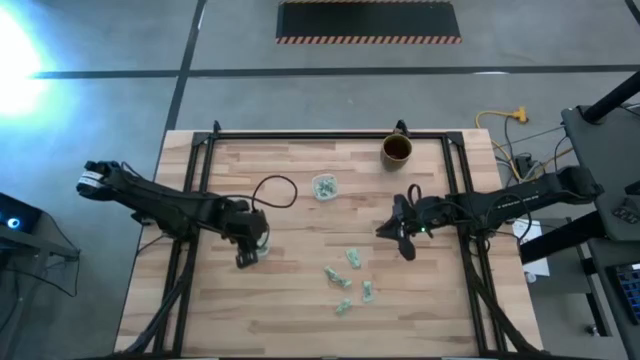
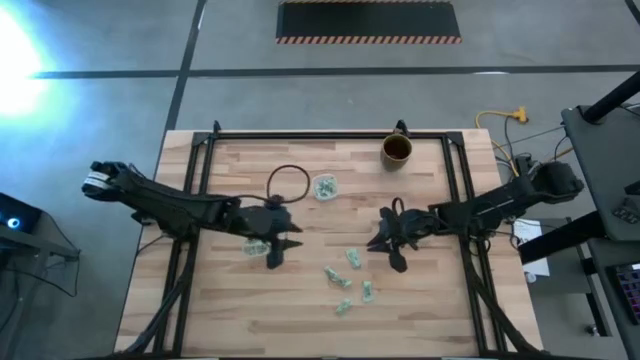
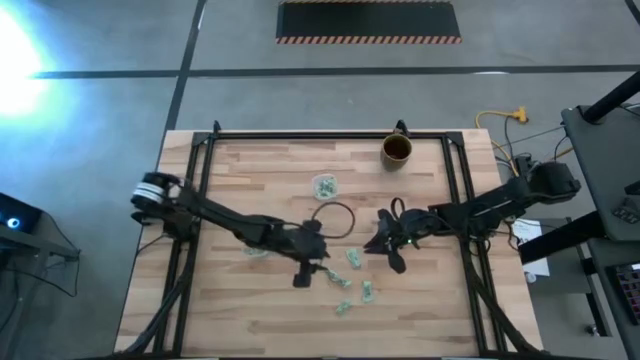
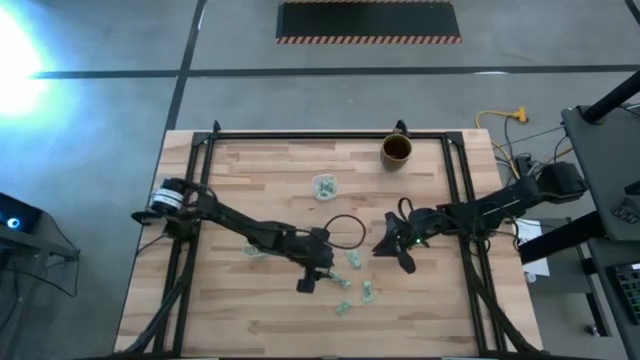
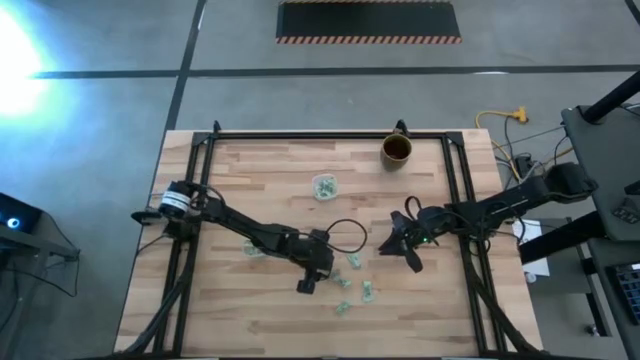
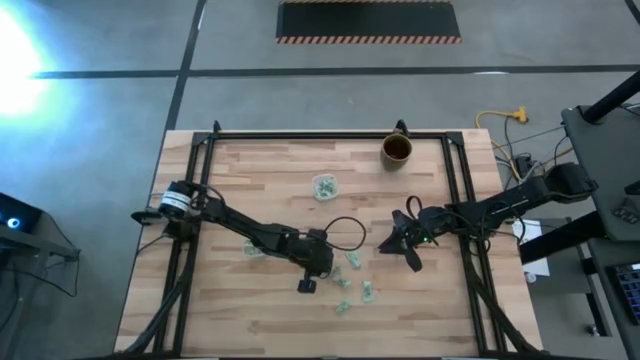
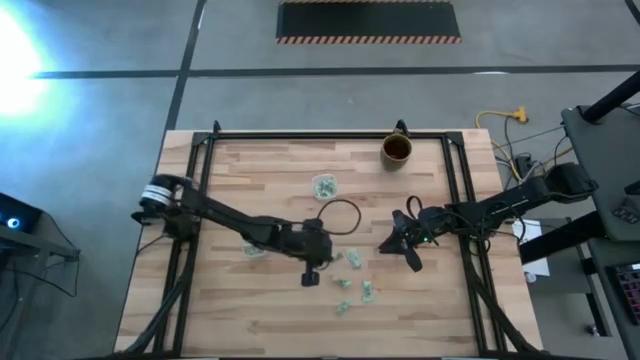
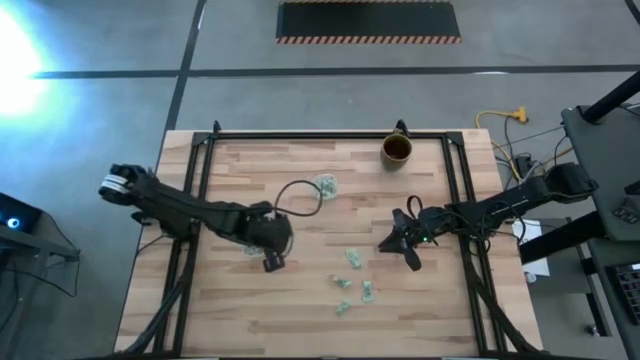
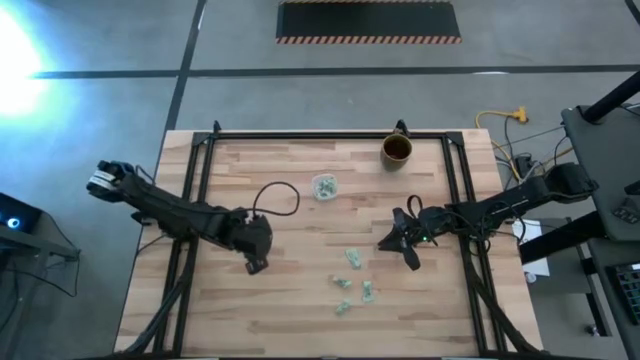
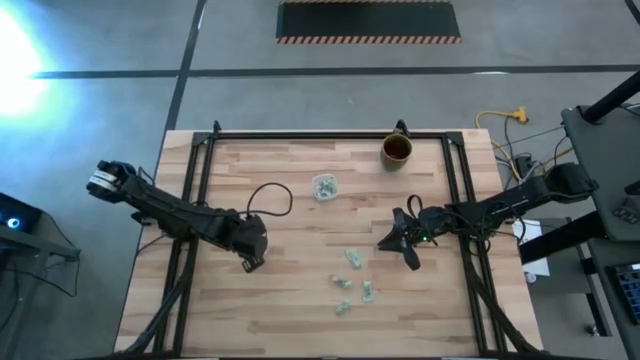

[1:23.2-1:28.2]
Task: Pick and place Stevia / Truvia into bins
Put the stevia packet into the bottom transparent container

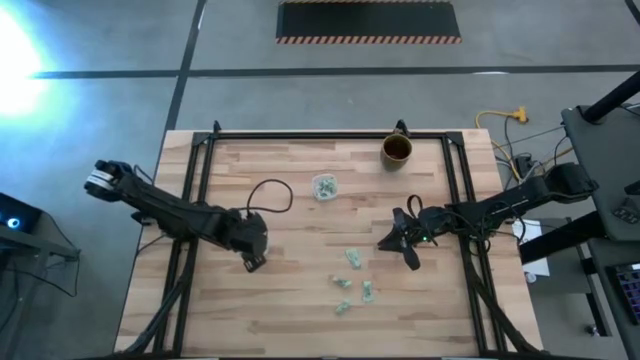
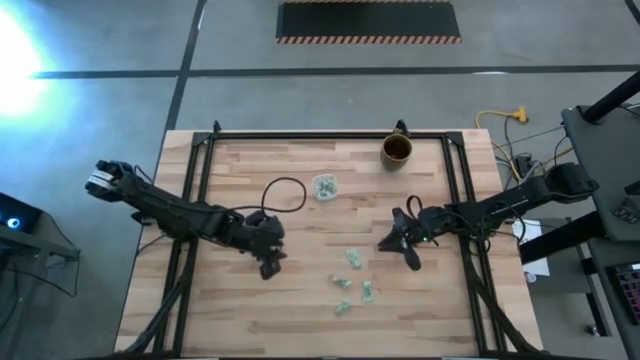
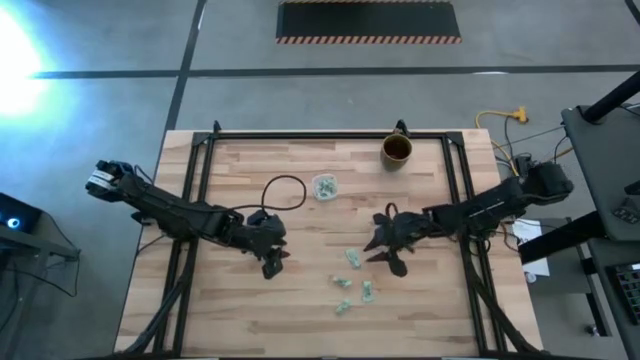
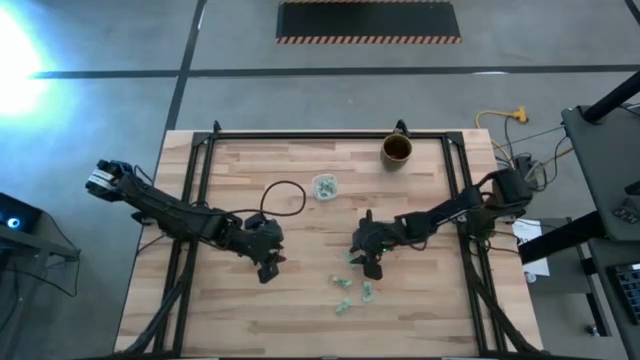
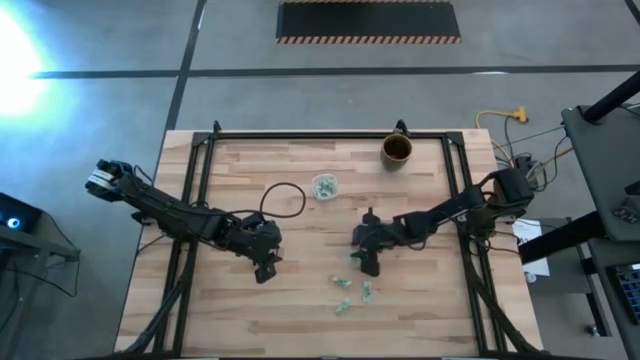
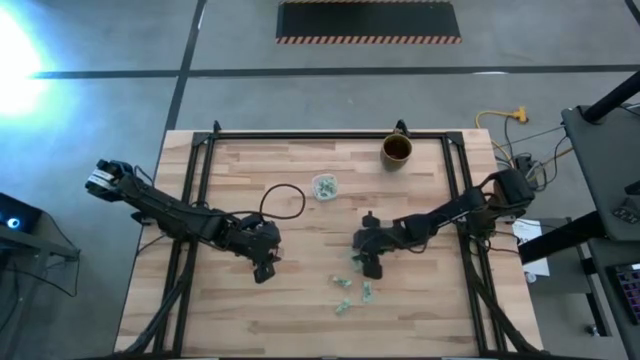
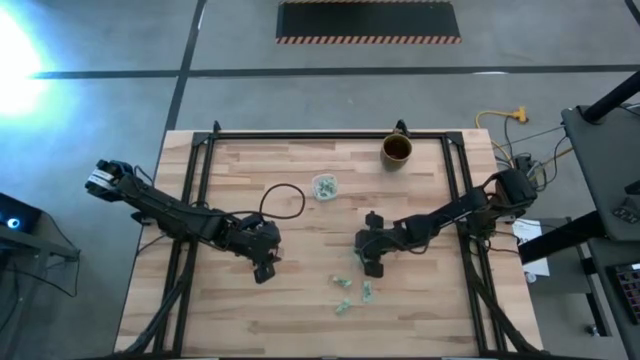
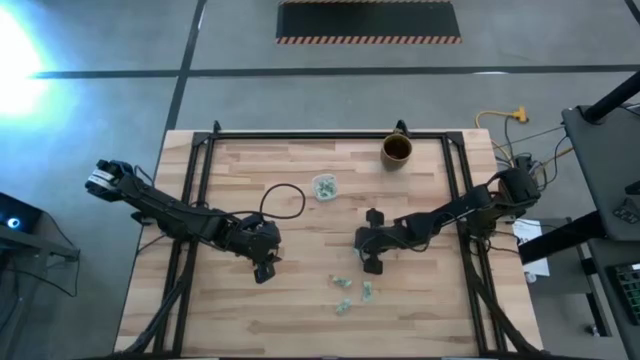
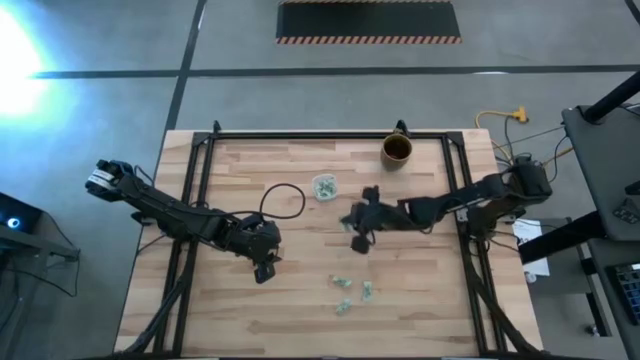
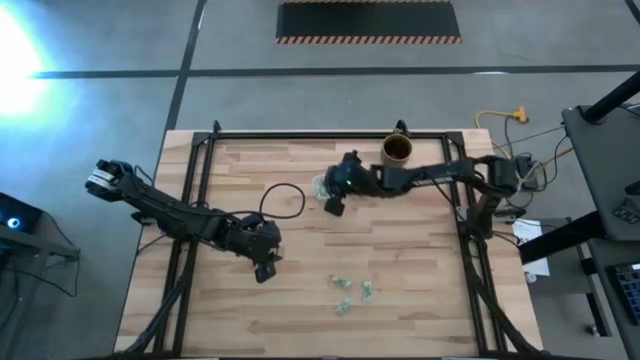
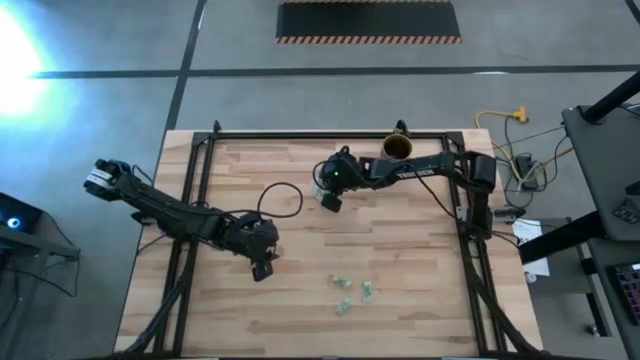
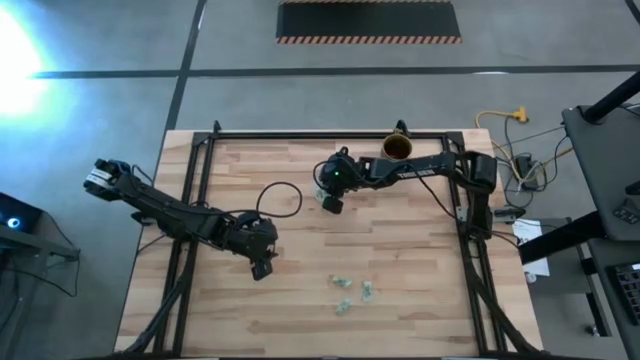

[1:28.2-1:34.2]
Put the stevia packet into the top transparent container

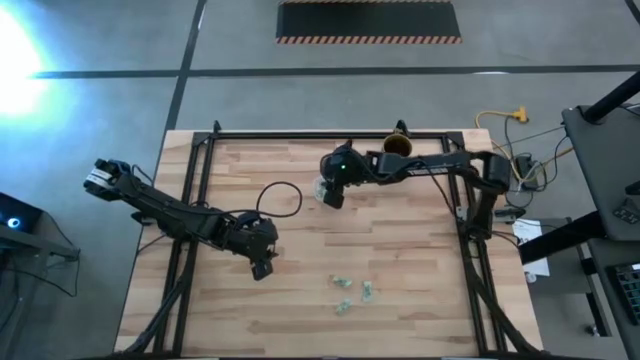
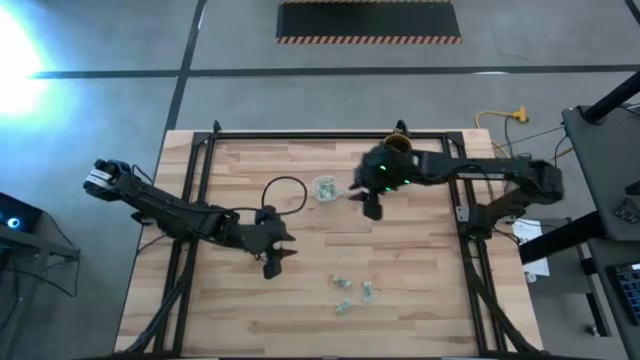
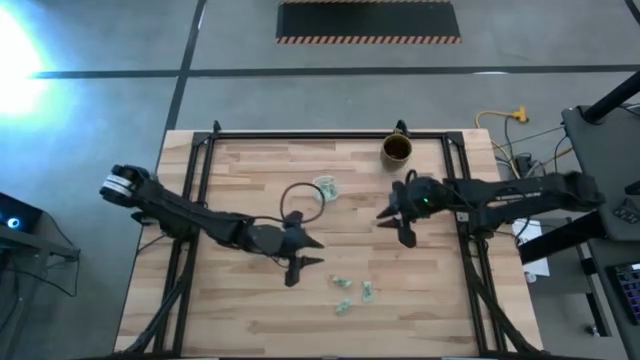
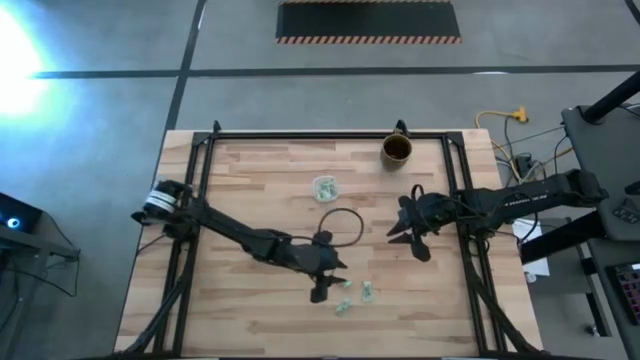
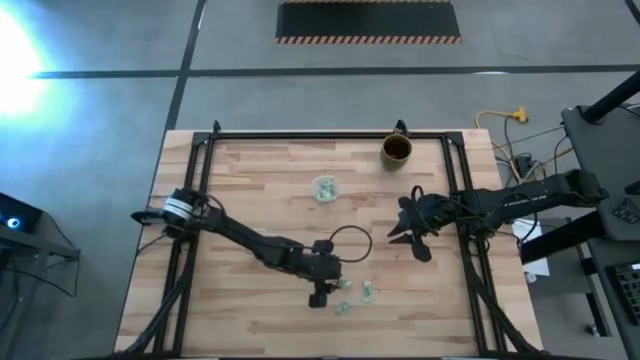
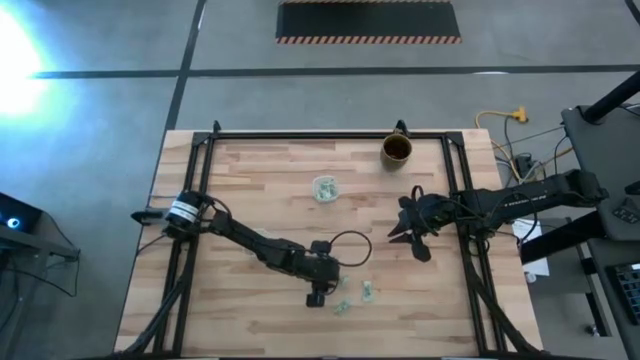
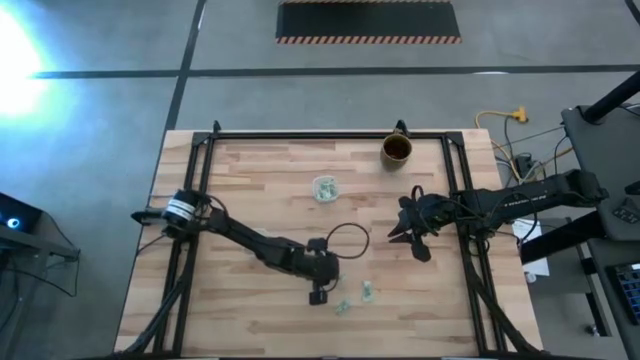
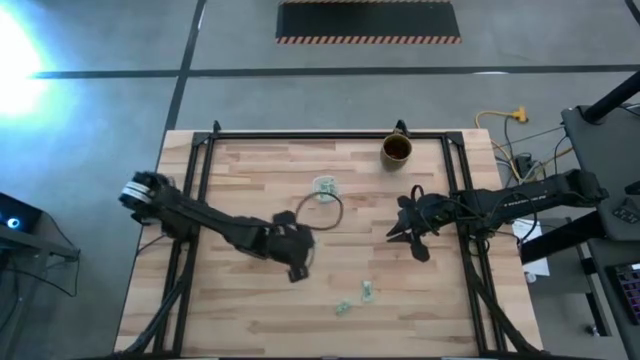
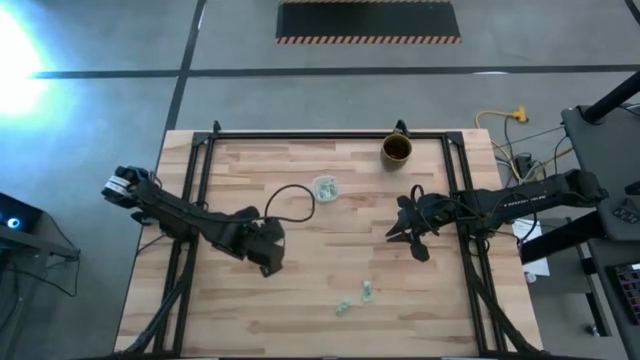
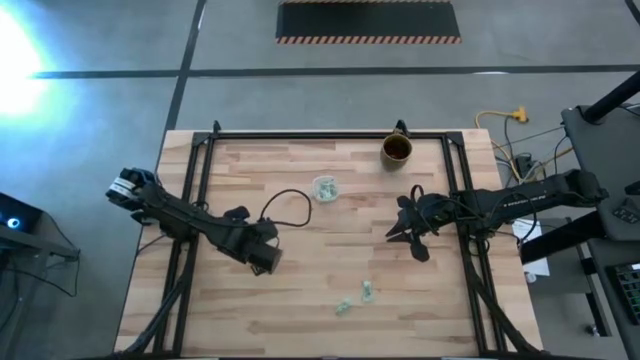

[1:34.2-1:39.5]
Put the top stevia packet into the bottom transparent container

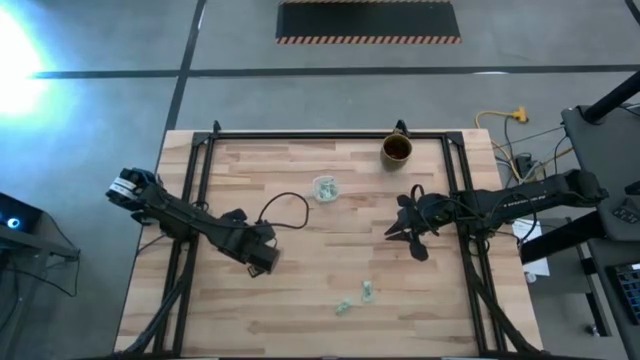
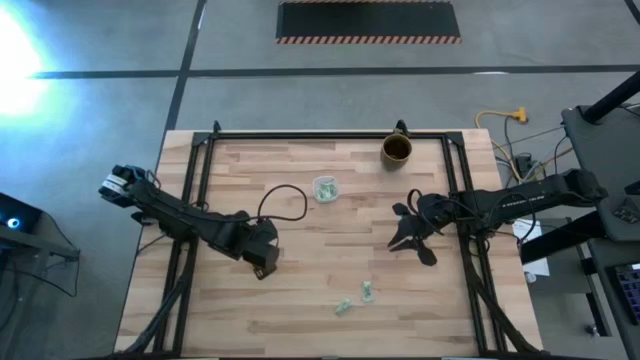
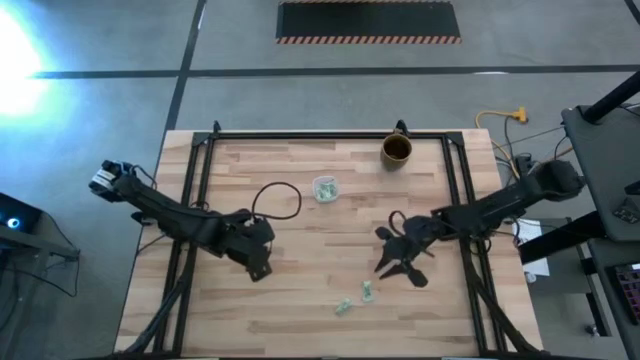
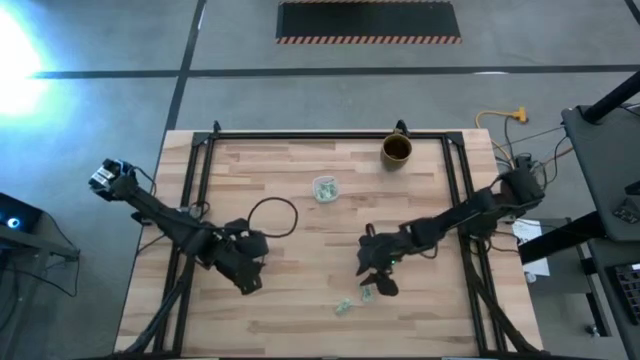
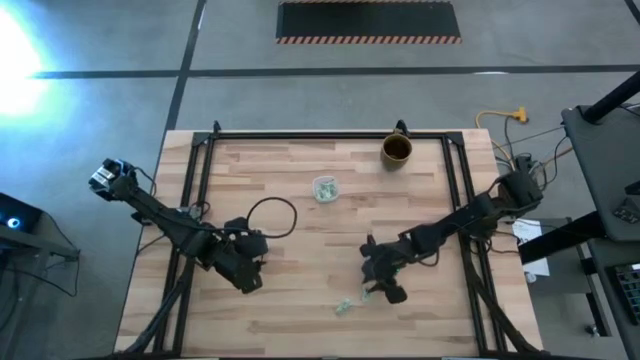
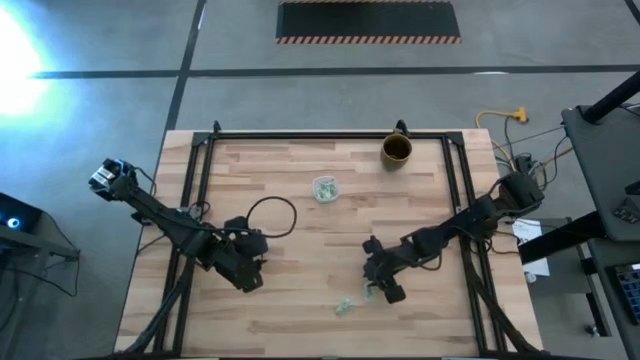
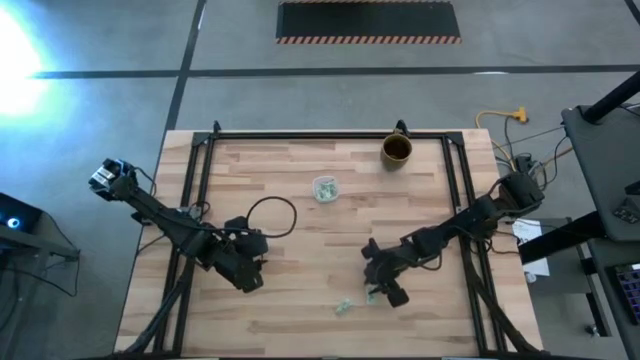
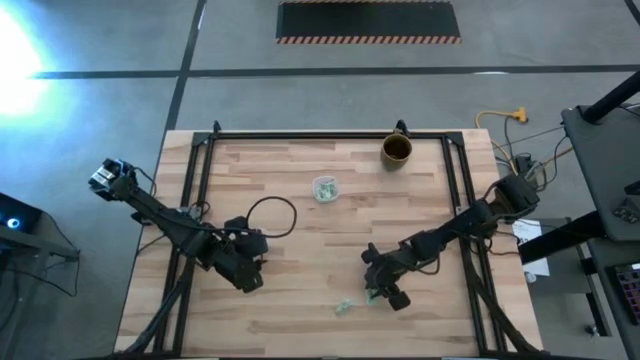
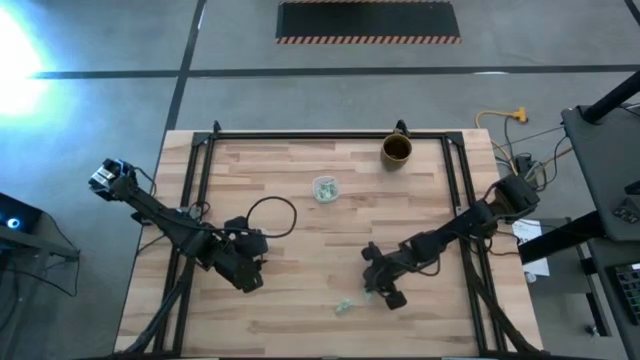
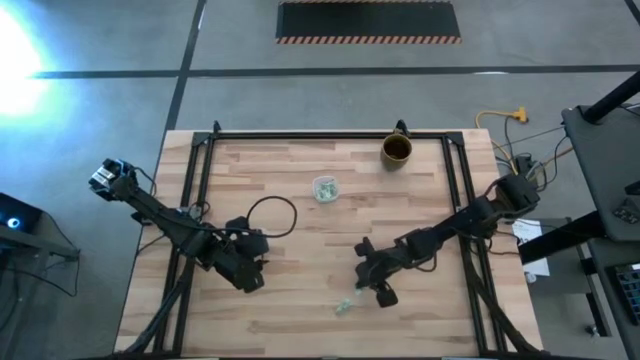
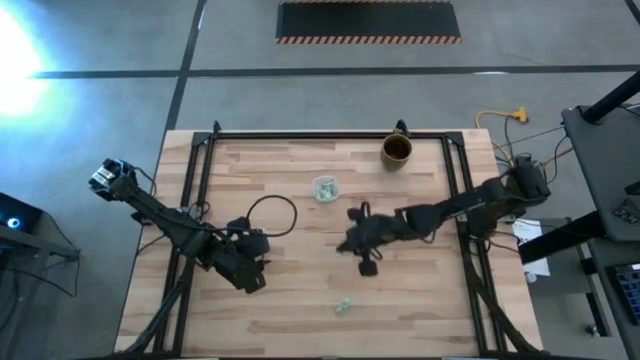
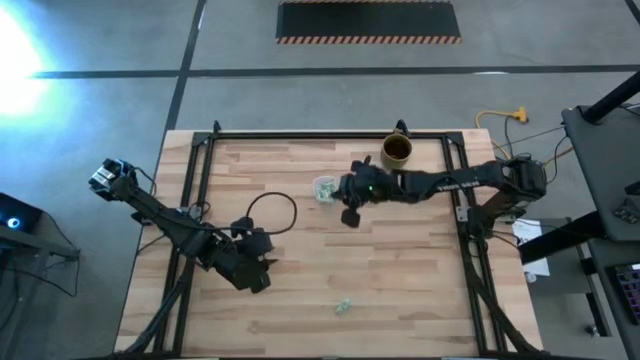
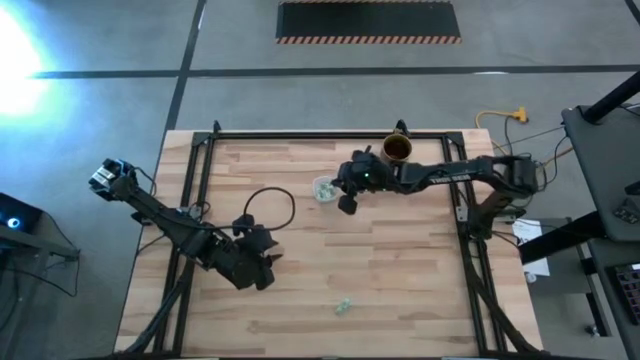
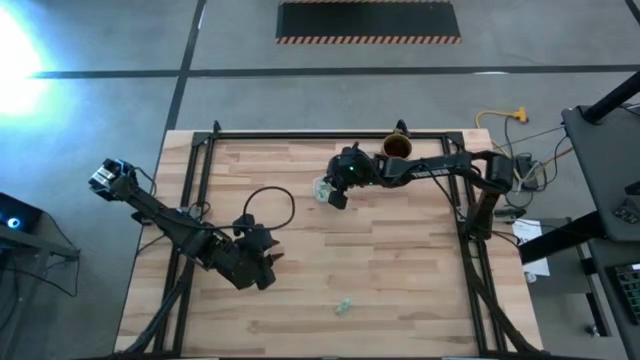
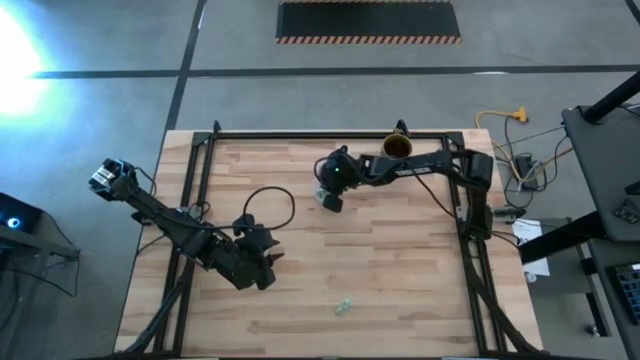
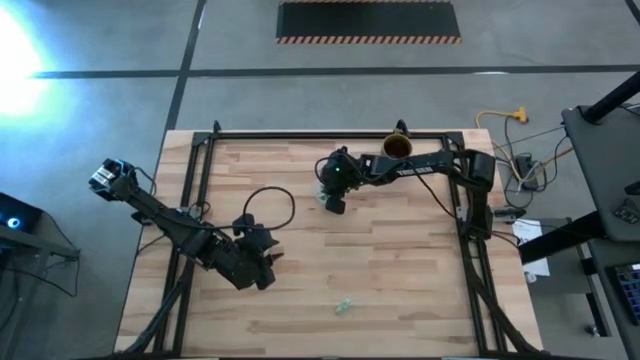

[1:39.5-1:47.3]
Put the top stevia packet into the top transparent container
